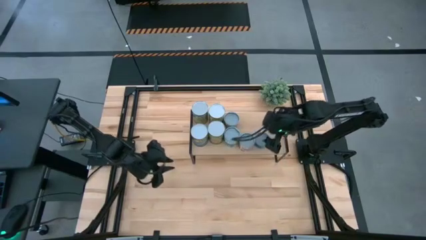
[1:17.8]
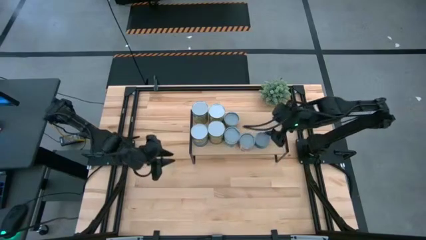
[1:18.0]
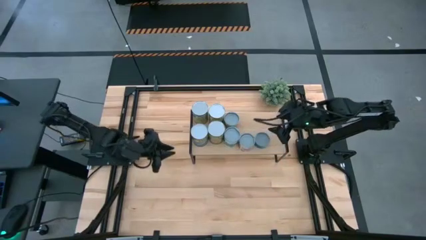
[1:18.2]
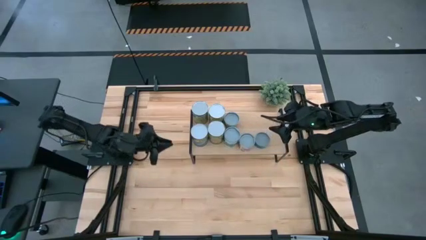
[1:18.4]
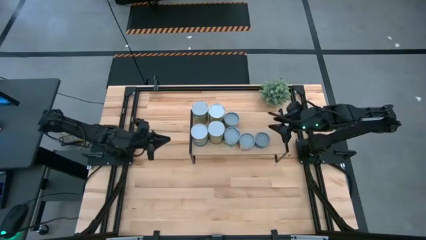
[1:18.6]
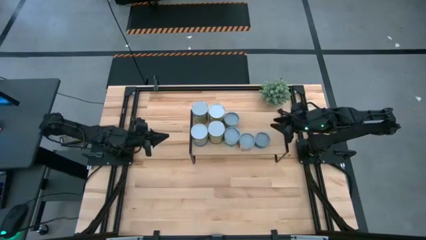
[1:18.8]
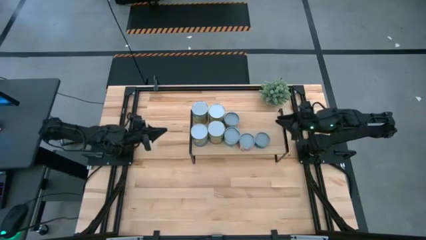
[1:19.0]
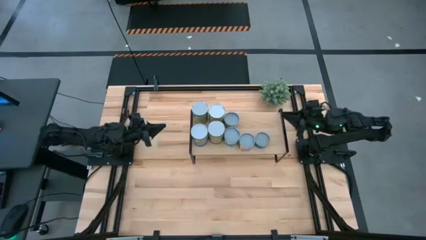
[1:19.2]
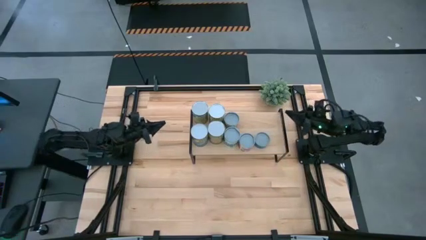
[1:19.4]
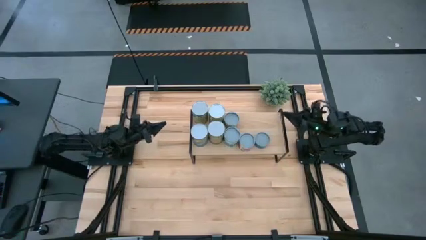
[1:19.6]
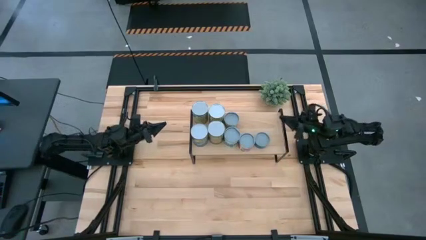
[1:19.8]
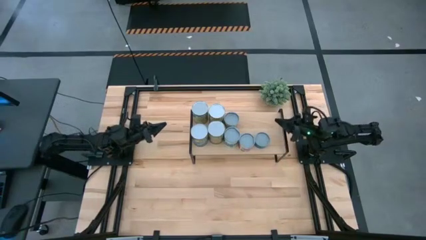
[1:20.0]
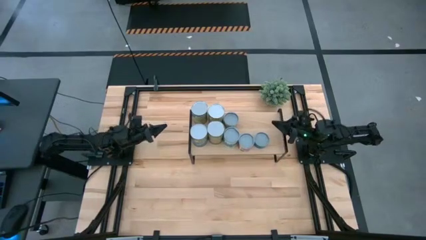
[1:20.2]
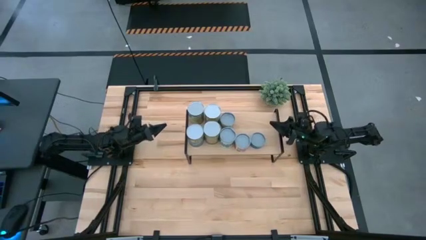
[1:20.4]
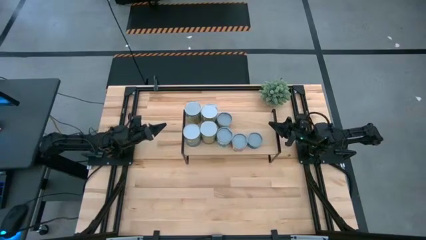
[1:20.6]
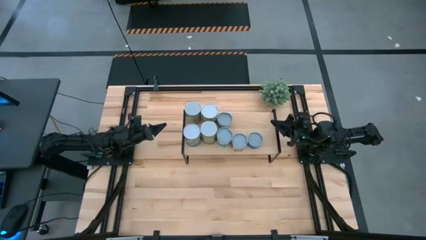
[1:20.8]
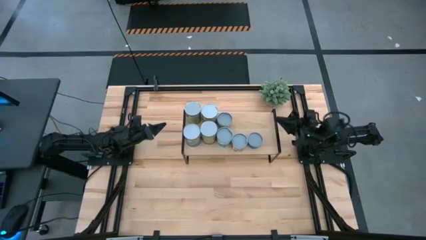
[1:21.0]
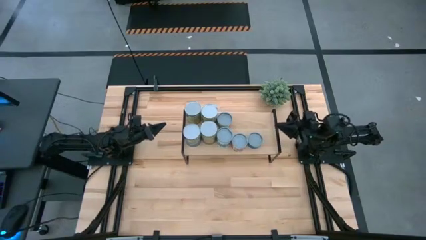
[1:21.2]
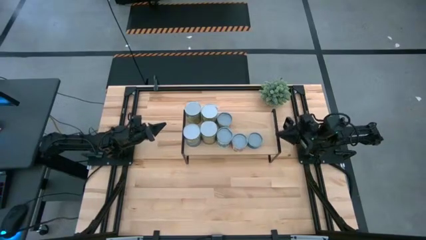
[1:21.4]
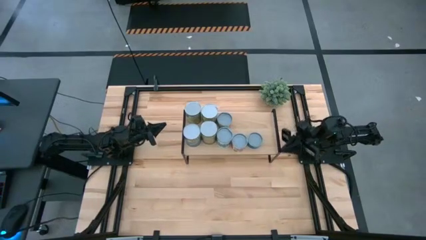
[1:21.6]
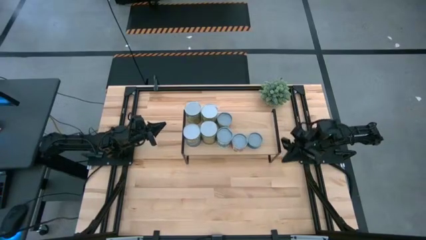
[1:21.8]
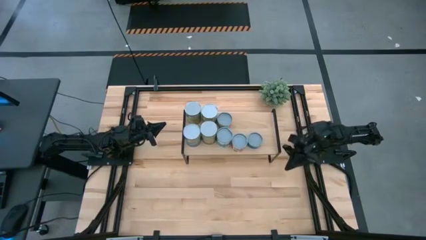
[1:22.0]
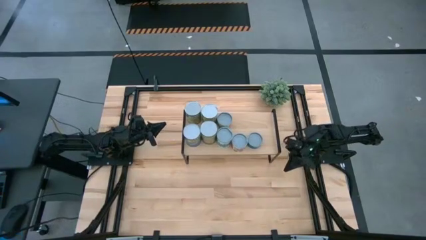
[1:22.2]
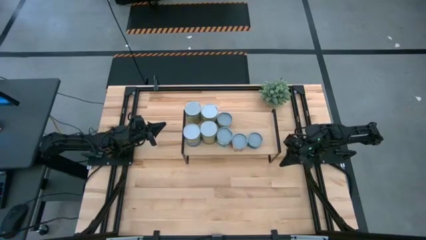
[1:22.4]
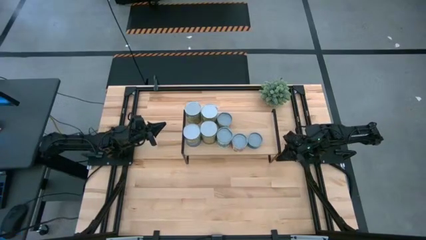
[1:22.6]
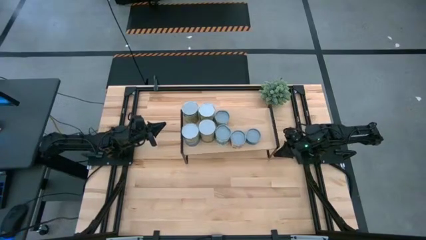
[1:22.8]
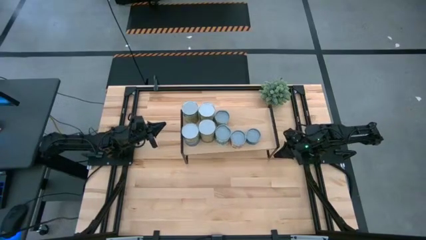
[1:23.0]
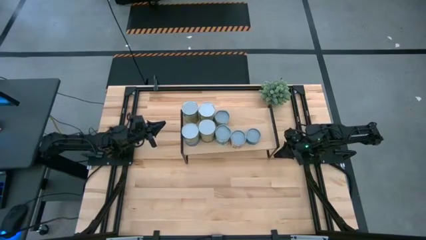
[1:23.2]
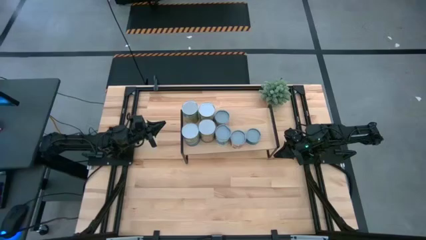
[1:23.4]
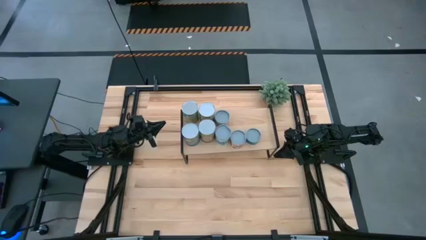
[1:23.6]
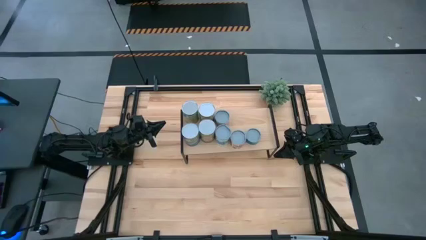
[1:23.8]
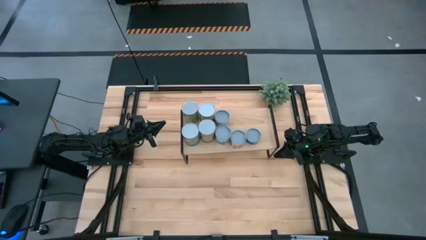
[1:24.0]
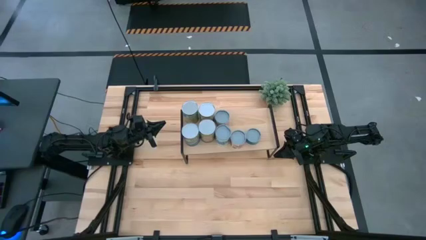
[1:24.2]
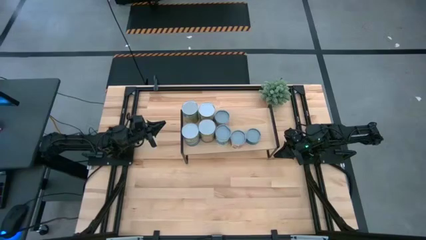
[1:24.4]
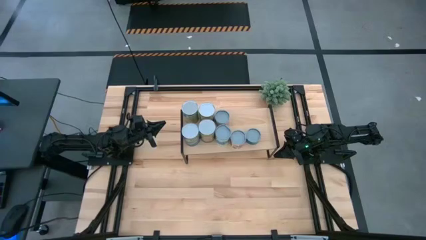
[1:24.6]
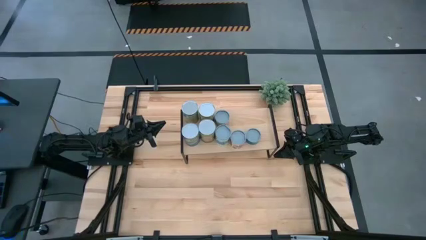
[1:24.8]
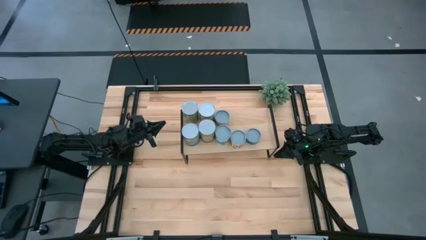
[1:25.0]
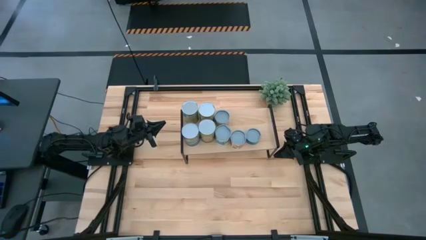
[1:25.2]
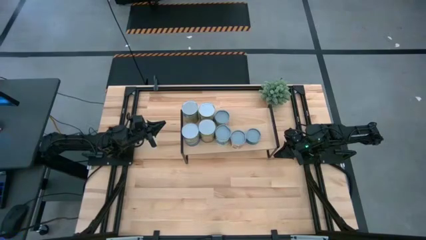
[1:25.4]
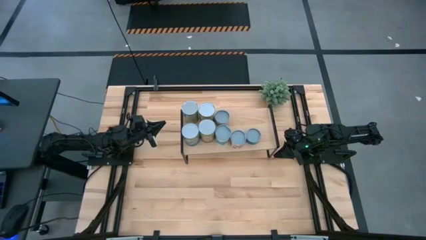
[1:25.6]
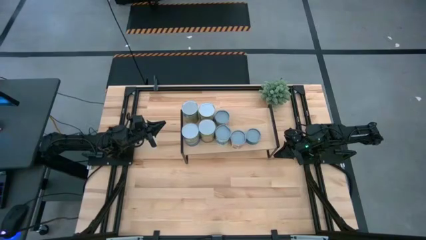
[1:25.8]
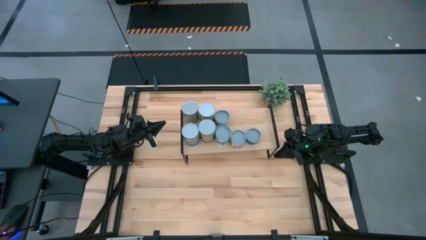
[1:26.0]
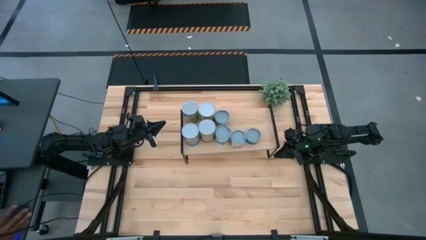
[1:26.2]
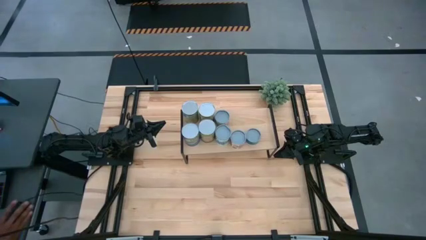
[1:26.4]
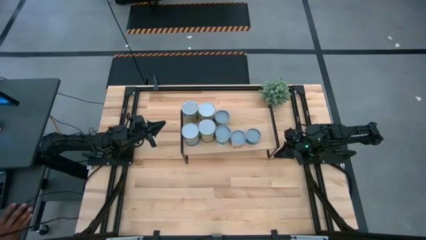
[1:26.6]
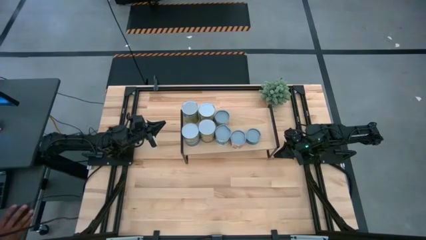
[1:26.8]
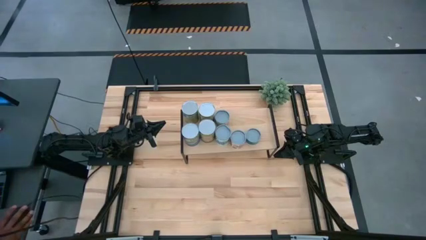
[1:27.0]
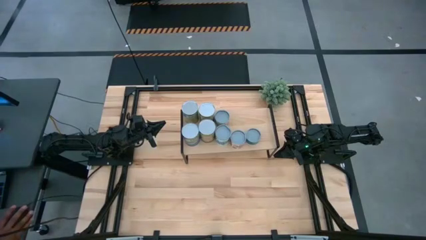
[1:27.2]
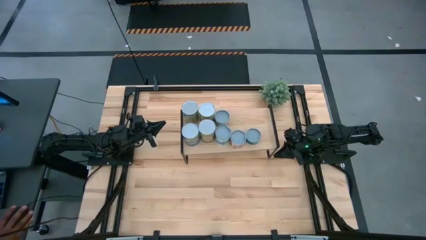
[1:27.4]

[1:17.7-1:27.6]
Task: Pick and place cans onto a shelf
Return to Home Position

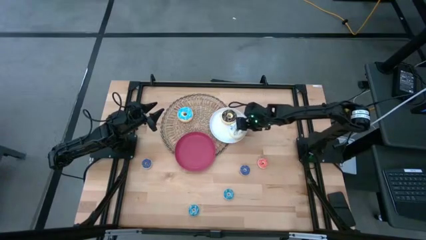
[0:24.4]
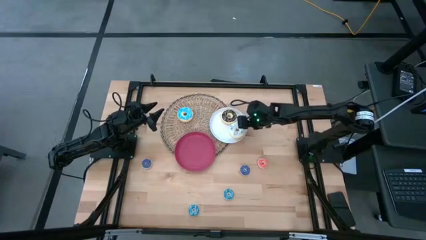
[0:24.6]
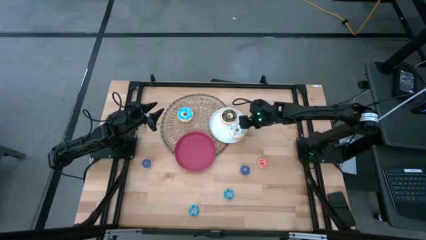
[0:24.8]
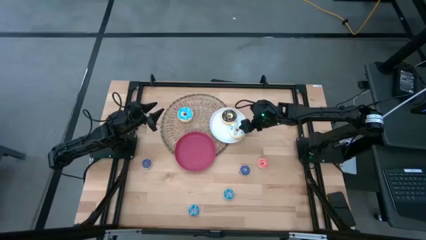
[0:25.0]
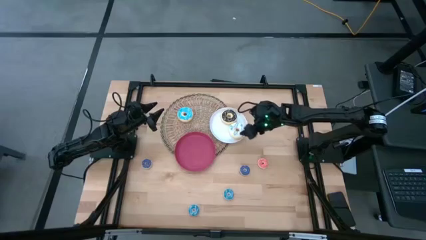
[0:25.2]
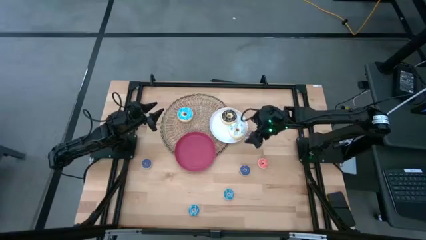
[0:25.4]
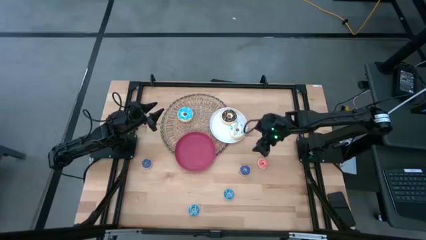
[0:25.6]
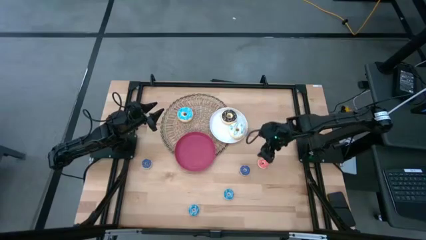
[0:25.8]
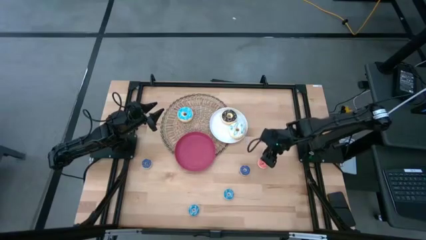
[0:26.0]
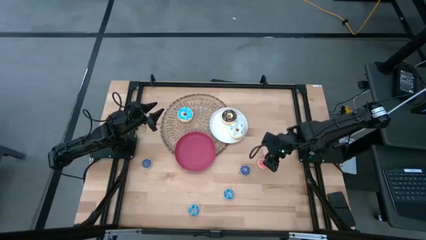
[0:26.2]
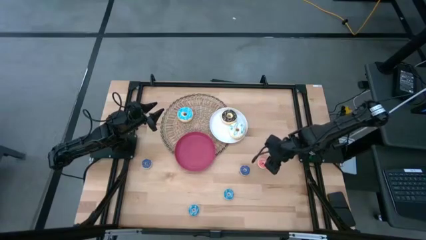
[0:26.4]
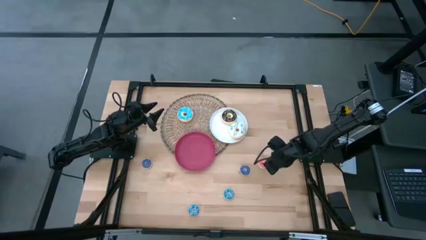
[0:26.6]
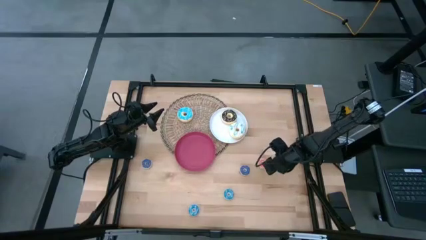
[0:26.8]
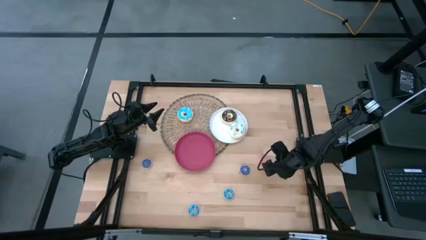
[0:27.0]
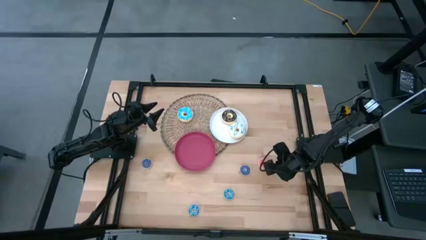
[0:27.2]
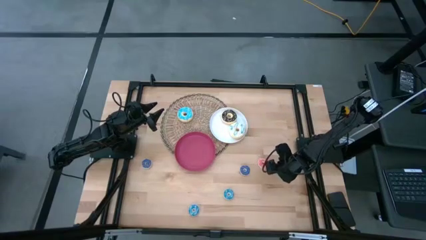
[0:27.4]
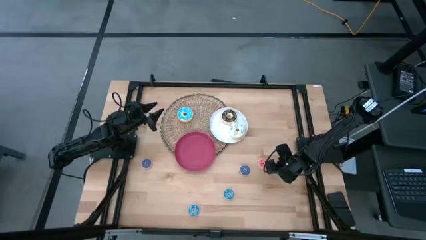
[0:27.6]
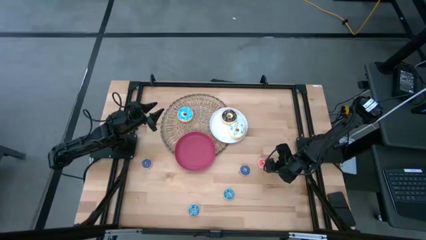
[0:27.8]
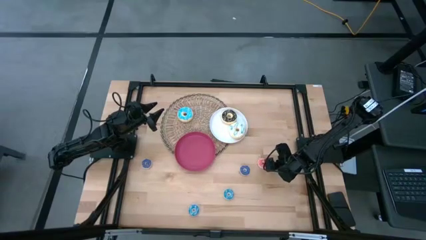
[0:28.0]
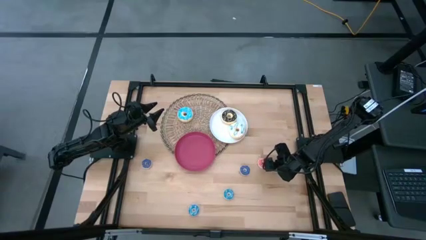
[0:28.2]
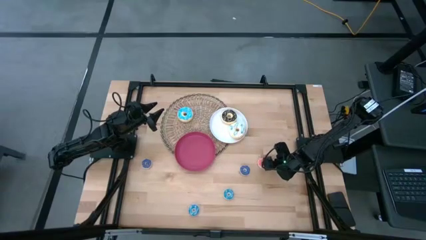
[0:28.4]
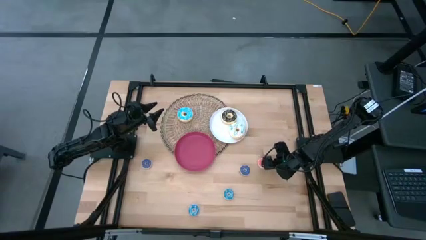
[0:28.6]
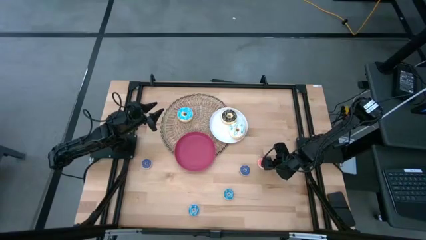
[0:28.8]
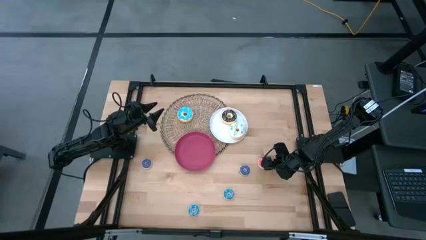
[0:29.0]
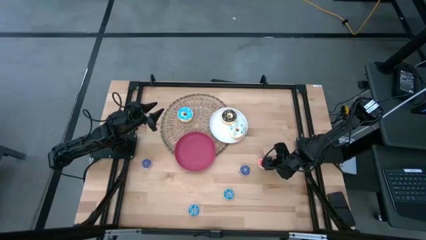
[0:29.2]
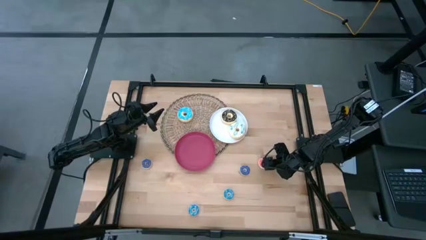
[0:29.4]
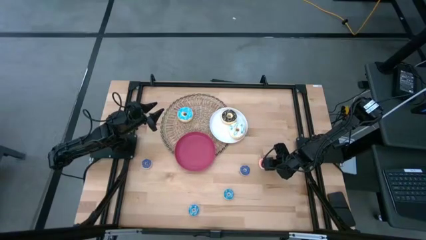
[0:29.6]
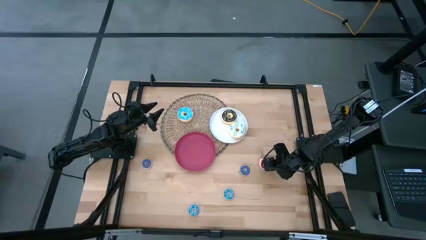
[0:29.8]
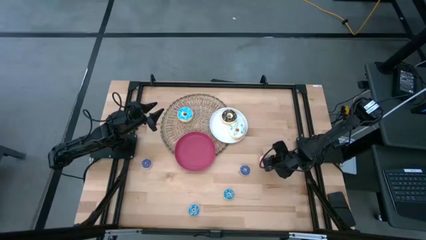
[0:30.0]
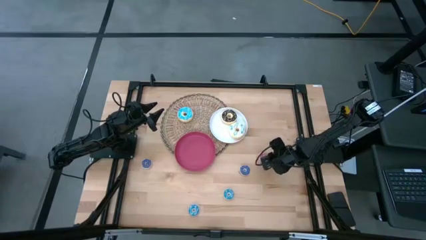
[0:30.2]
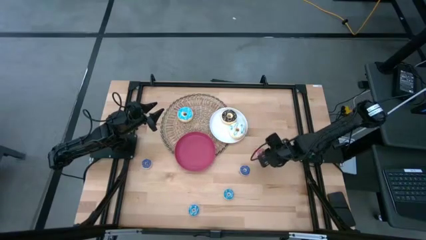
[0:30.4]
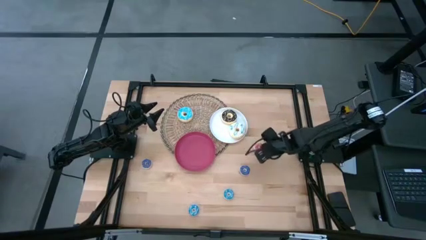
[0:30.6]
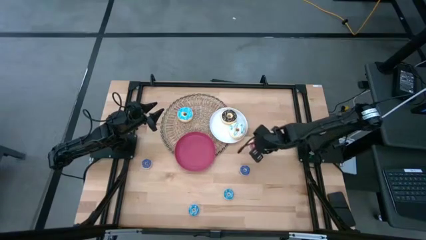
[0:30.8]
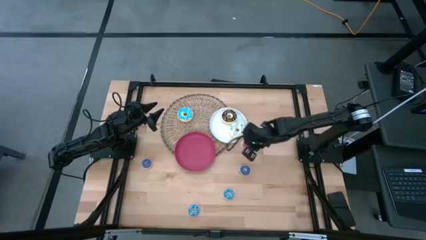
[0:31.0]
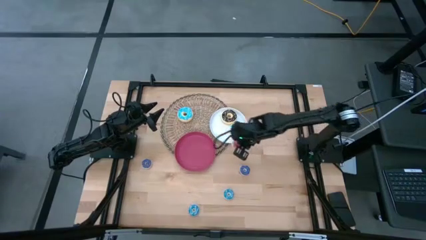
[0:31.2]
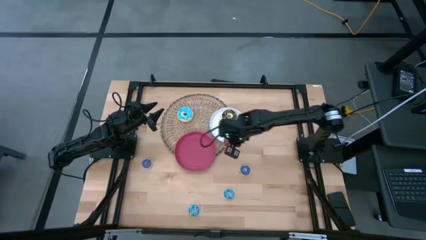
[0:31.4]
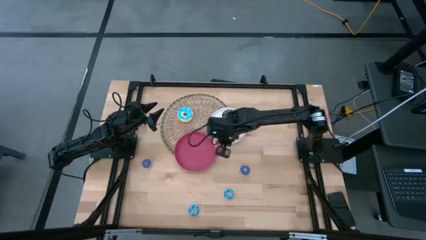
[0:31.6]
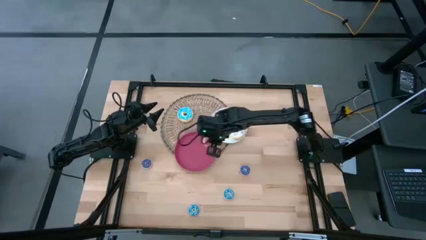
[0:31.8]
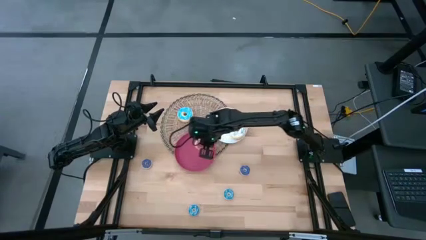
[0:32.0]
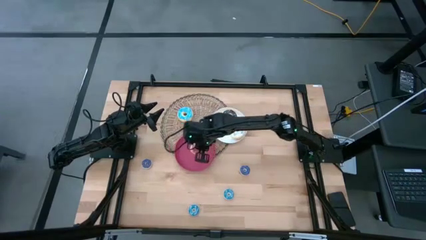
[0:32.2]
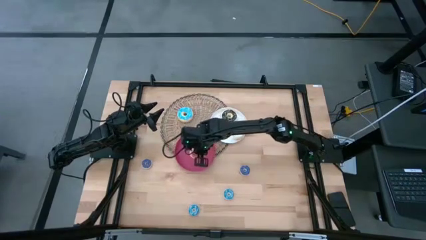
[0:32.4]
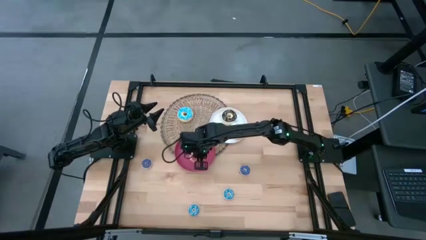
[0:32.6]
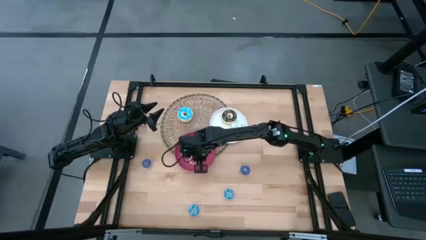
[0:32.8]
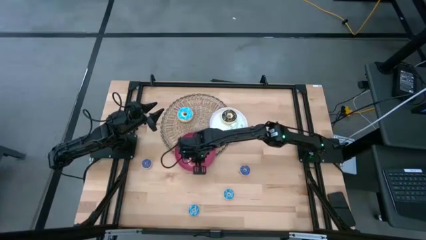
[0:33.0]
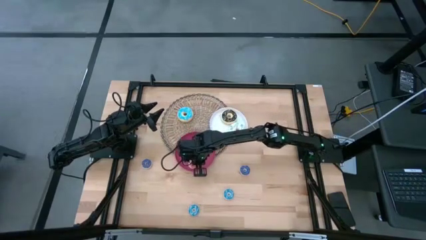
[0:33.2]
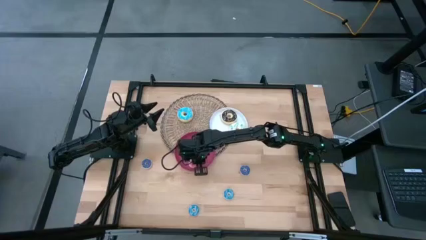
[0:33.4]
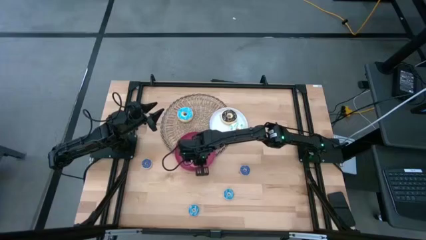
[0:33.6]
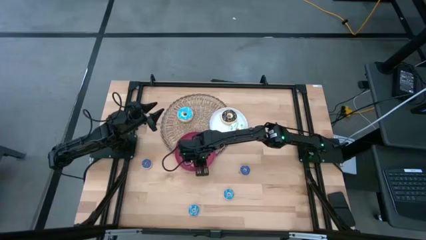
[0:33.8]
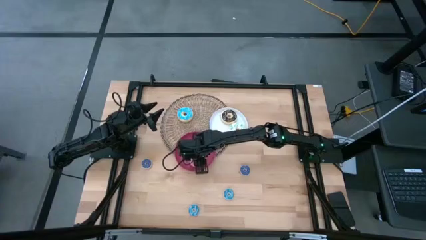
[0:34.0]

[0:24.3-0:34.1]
Task: Pick & Place donuts
Put the pink donut on the pink plate
